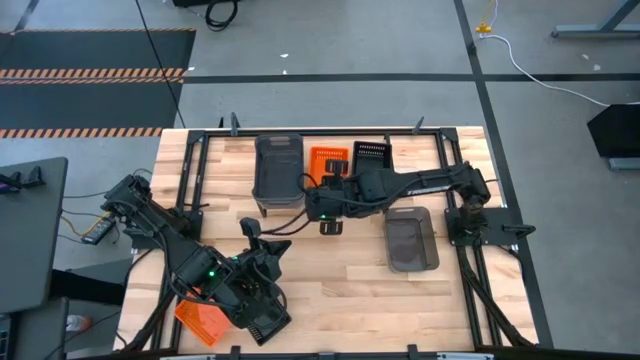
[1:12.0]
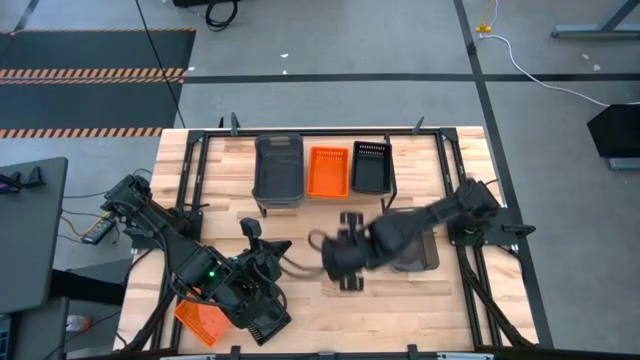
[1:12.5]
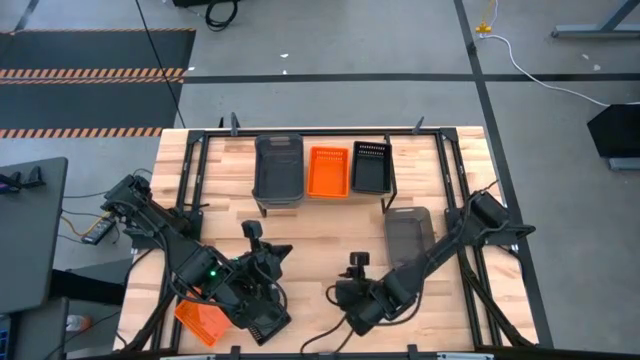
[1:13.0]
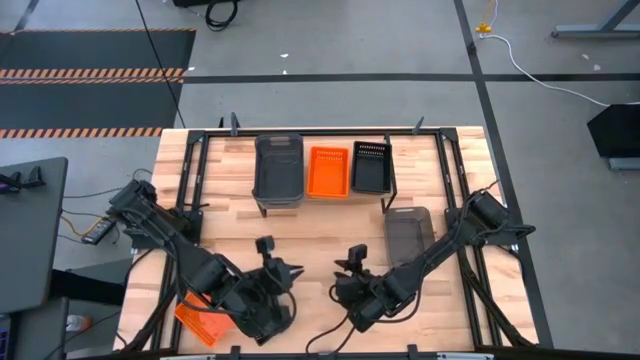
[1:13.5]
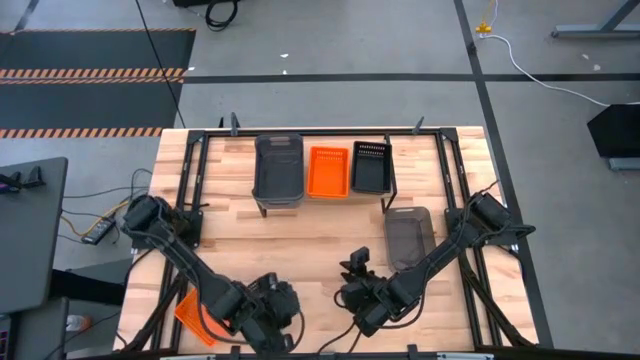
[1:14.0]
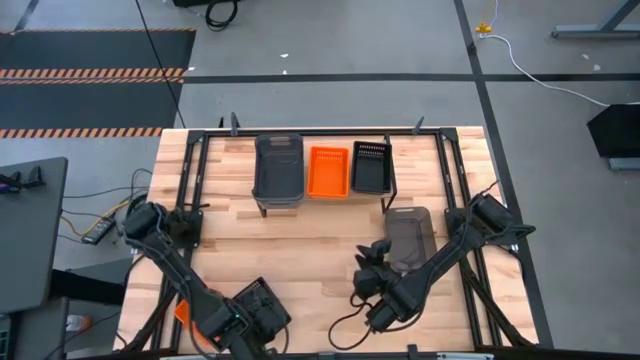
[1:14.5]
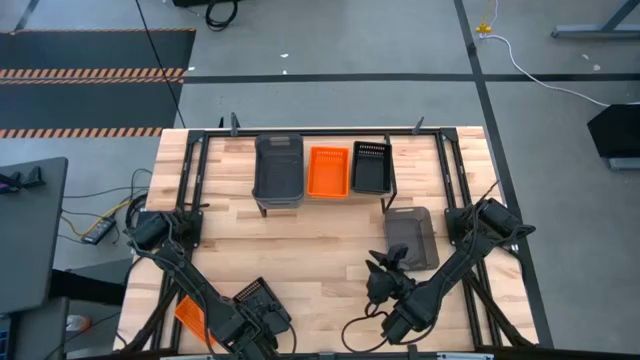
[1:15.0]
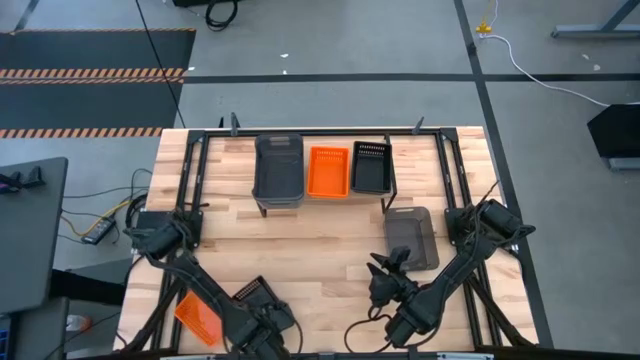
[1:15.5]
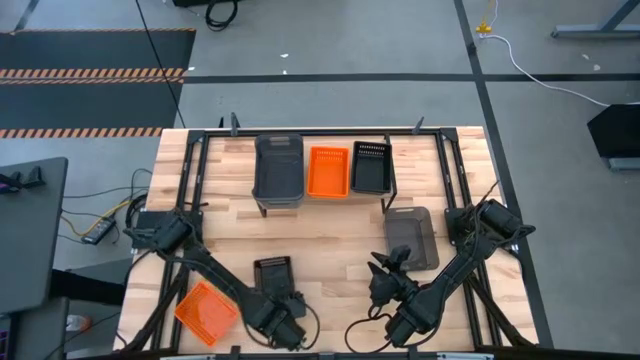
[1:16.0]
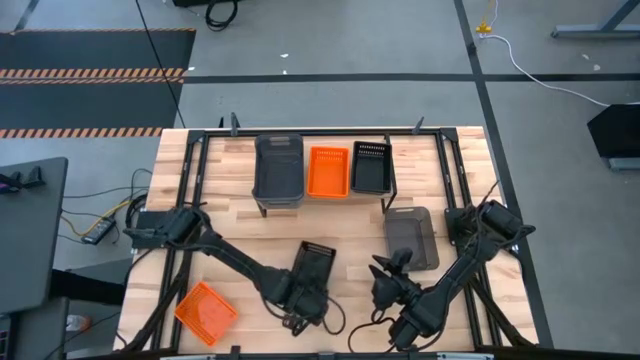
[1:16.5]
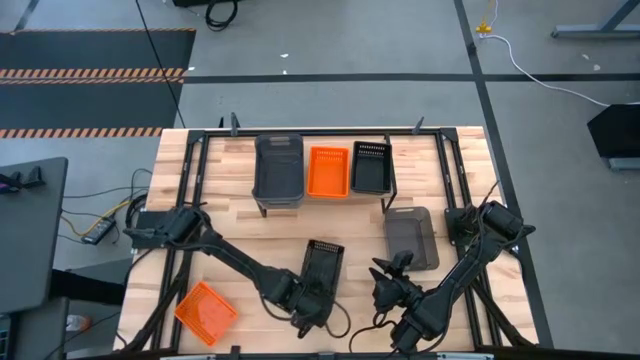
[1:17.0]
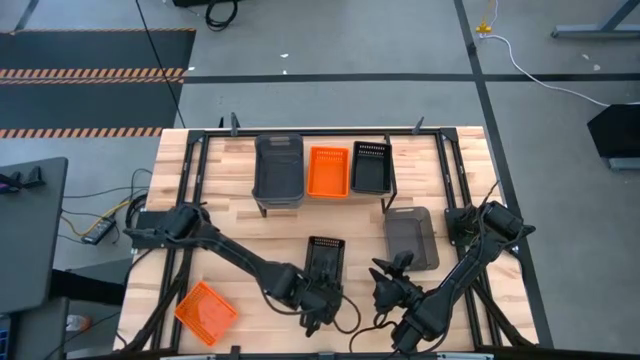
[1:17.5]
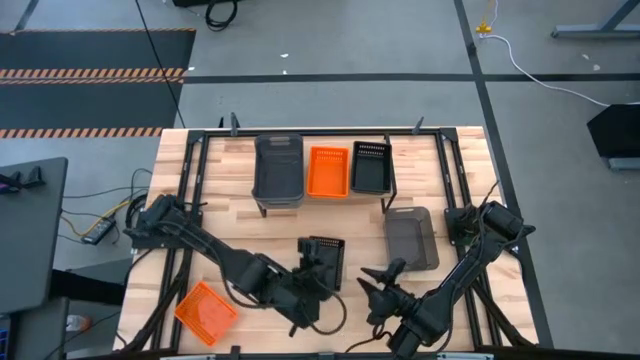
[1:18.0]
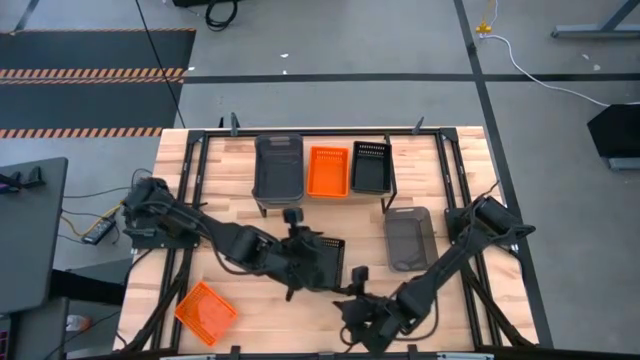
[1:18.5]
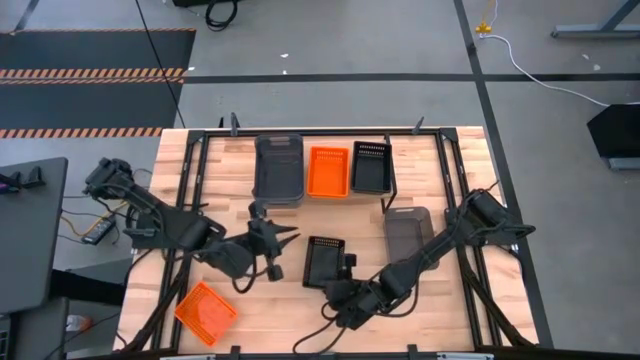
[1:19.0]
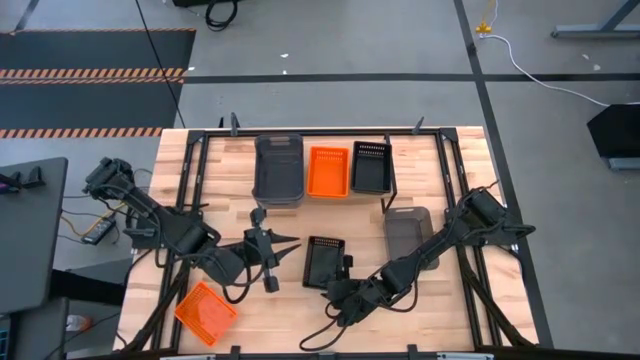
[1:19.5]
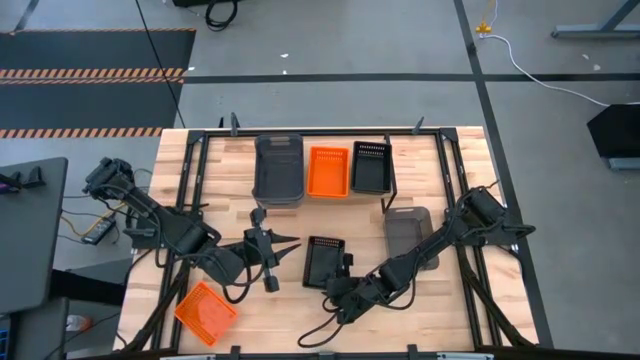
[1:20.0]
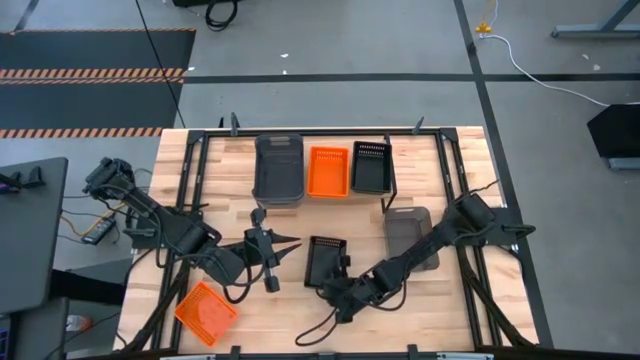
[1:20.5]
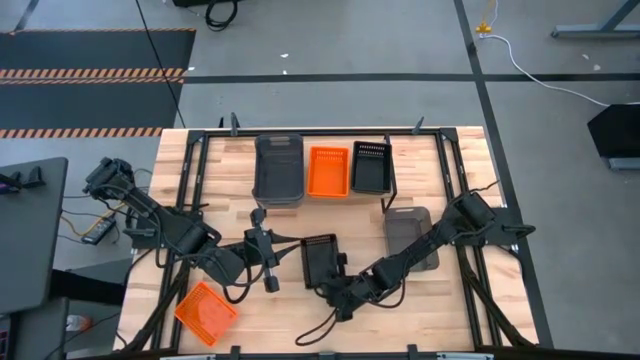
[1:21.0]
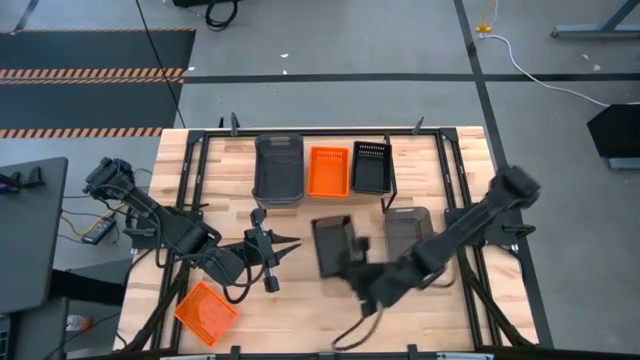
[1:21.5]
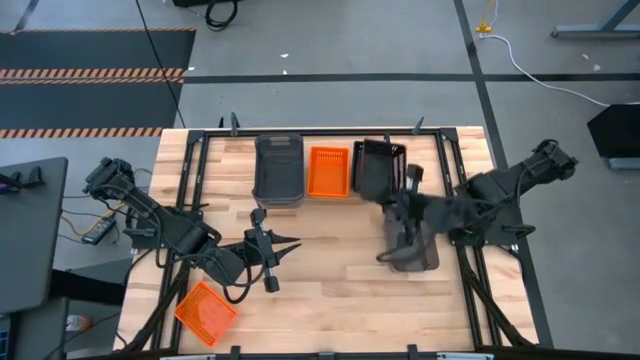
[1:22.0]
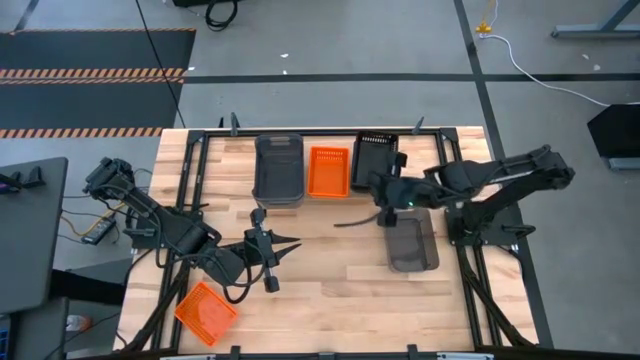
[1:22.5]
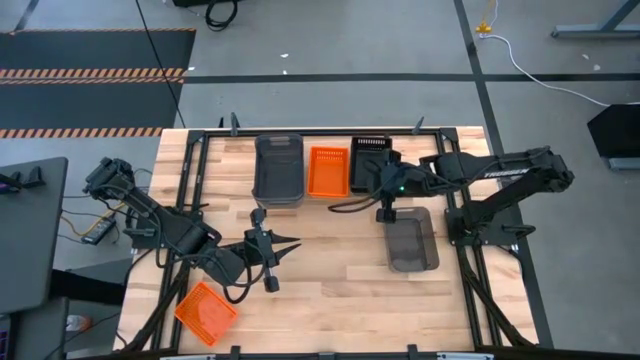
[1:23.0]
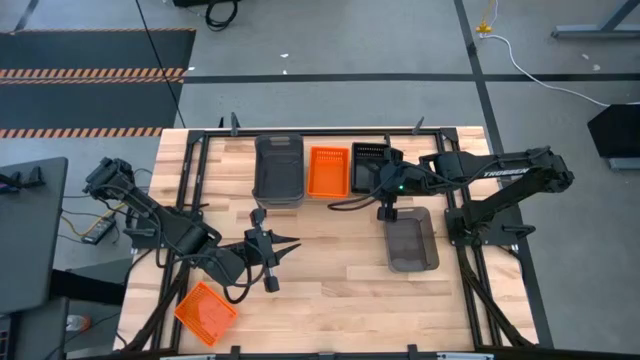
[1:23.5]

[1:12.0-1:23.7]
Task: Stack baskets on shelf by color
Stack the black bin on the black bin on the shelf

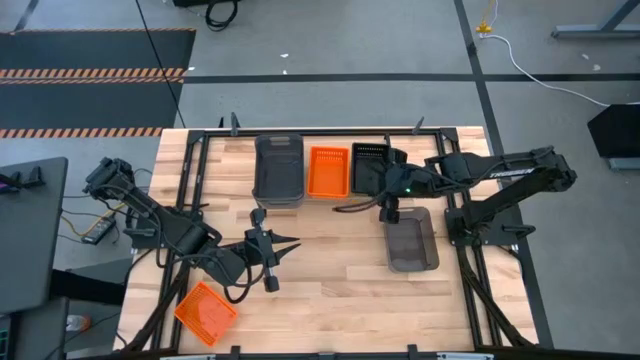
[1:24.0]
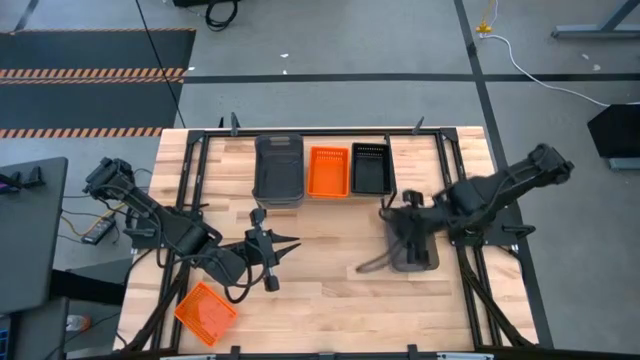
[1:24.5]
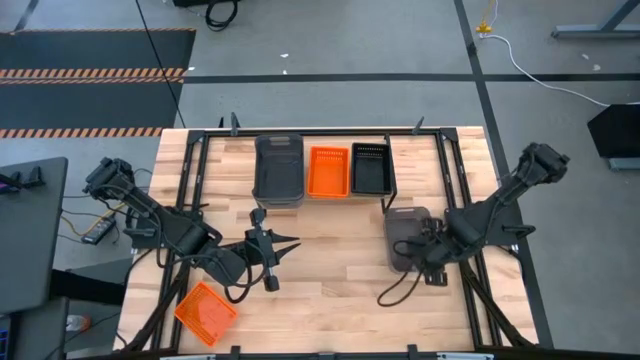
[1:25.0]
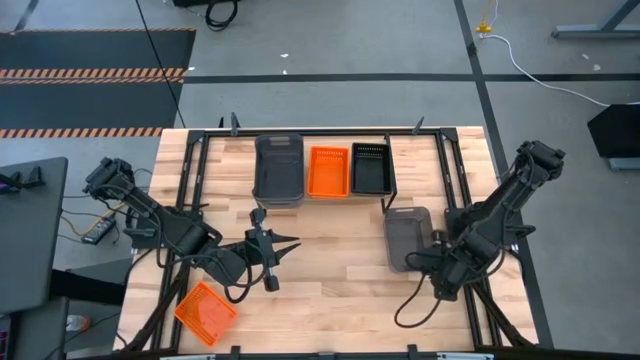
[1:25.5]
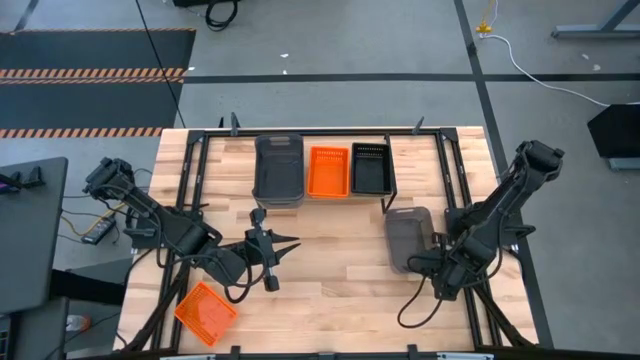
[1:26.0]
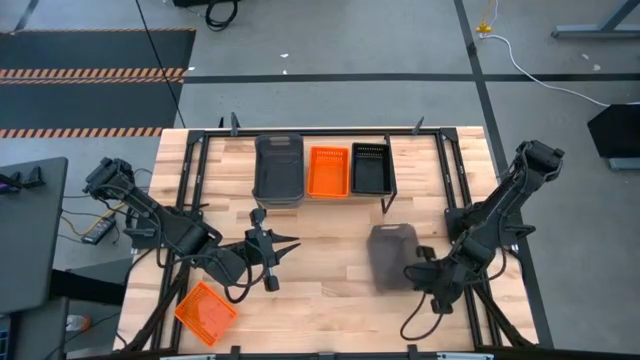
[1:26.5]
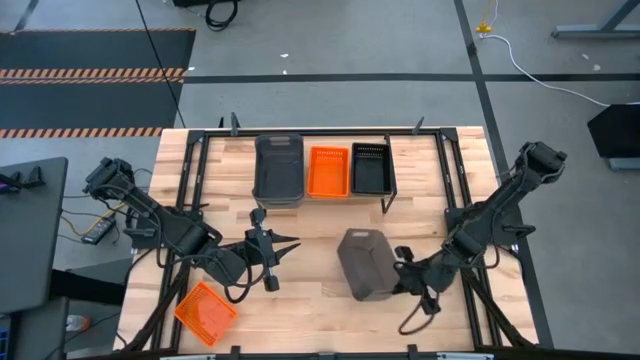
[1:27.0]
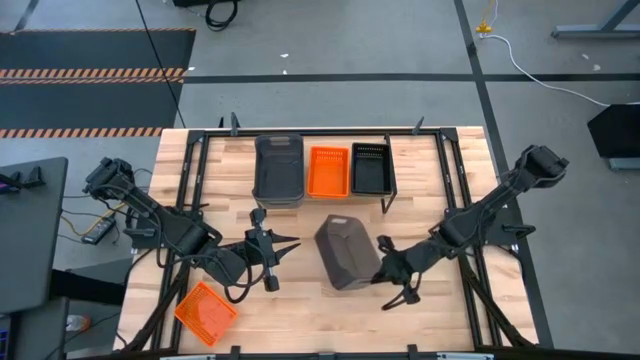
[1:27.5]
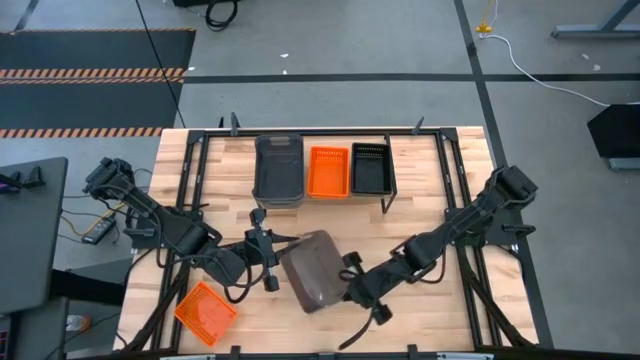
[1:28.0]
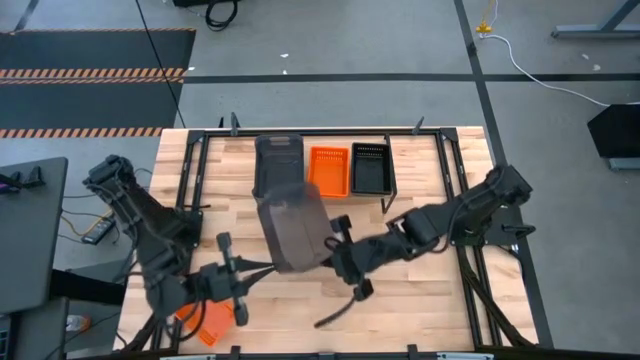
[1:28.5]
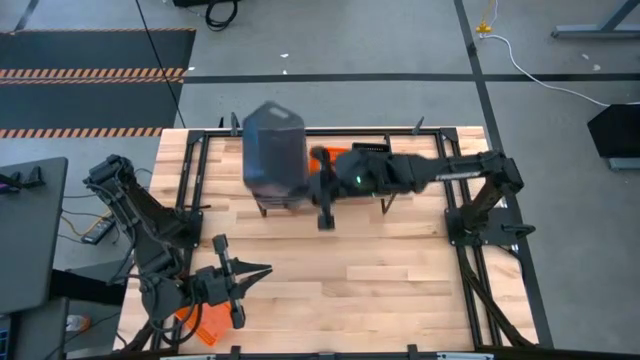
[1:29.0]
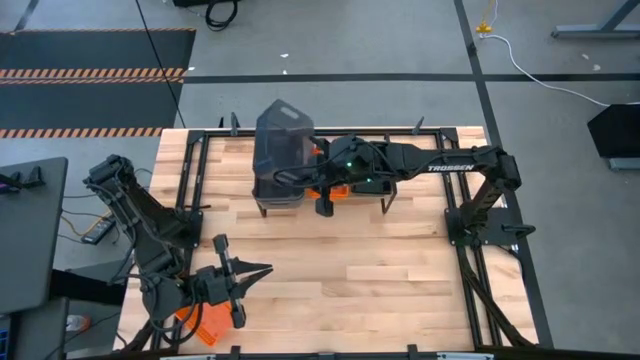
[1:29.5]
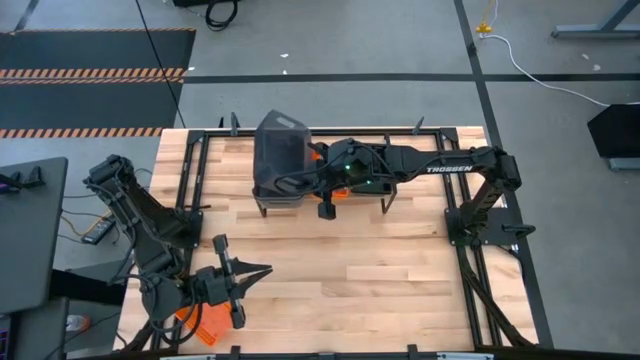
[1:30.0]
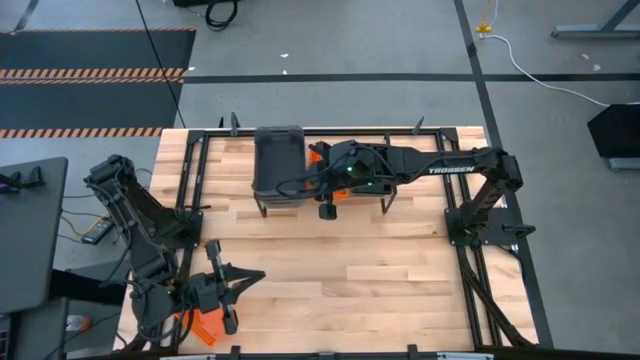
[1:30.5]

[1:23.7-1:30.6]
Stack the gray bin on the gray bin on the shelf

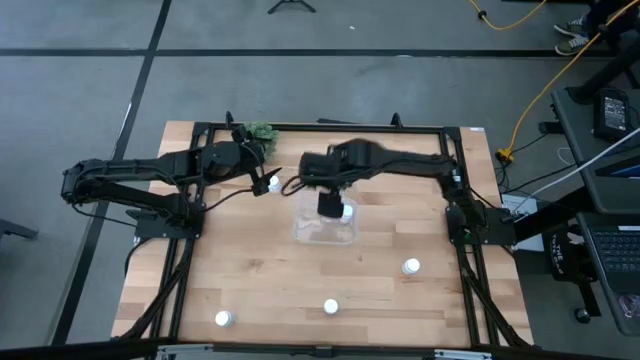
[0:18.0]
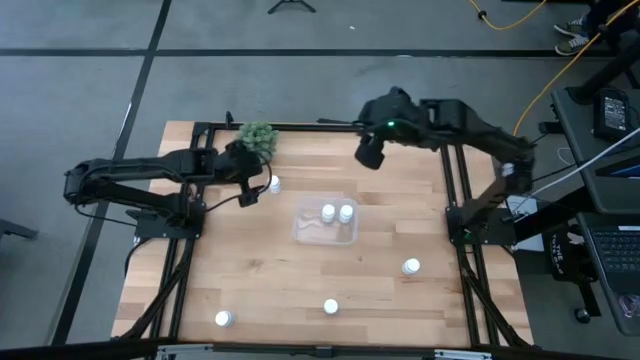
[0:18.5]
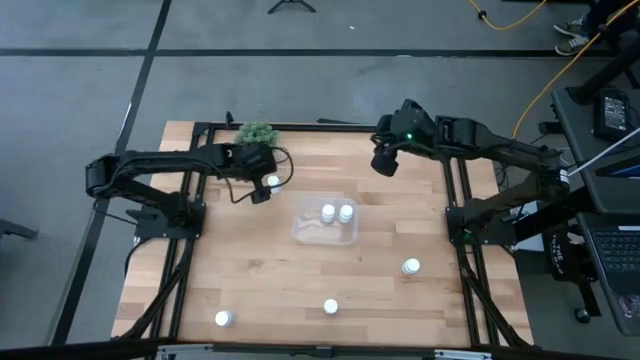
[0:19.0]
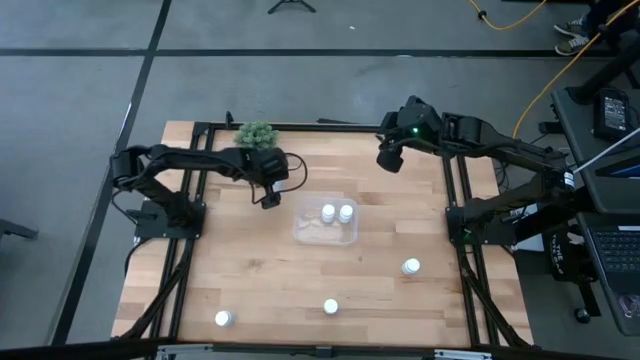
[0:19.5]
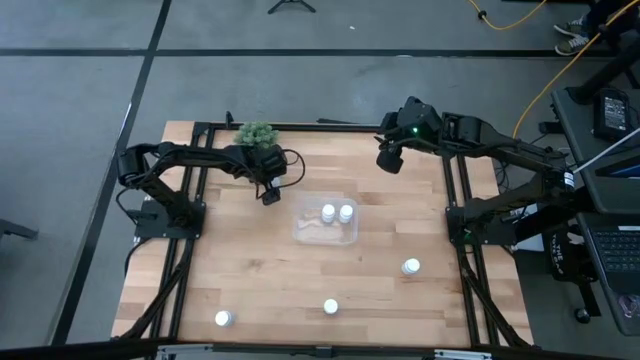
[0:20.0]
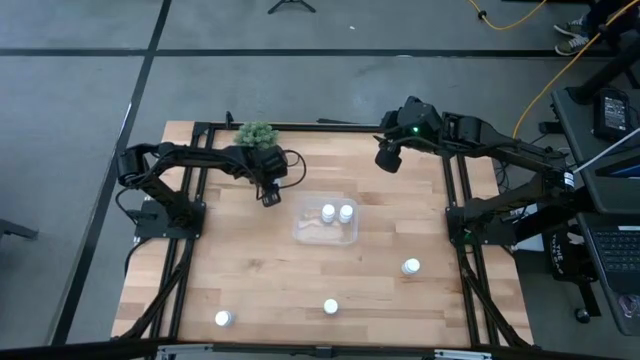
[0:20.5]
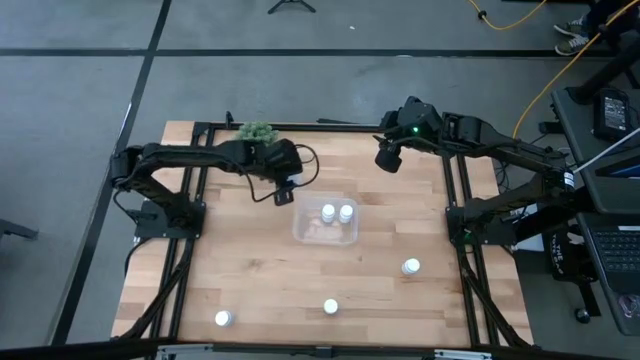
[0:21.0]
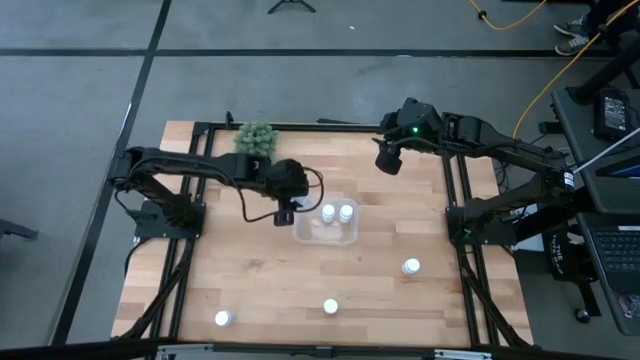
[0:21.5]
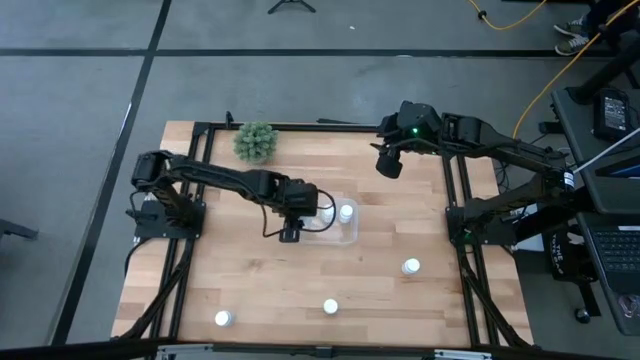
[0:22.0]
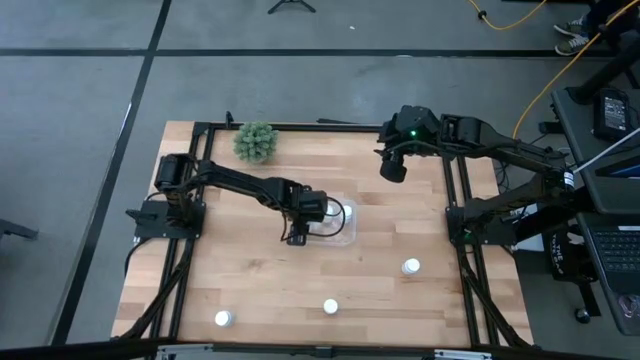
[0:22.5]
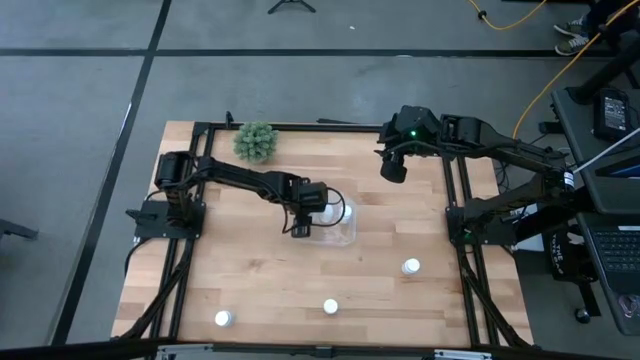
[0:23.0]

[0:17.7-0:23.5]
Task: Pick and place pill bottles into a basket
Put the white medicine bottle into the transparent bin
